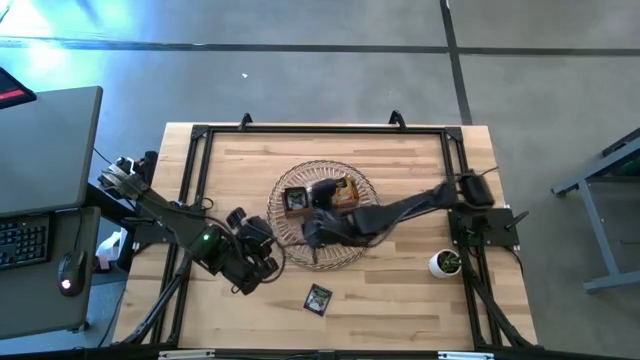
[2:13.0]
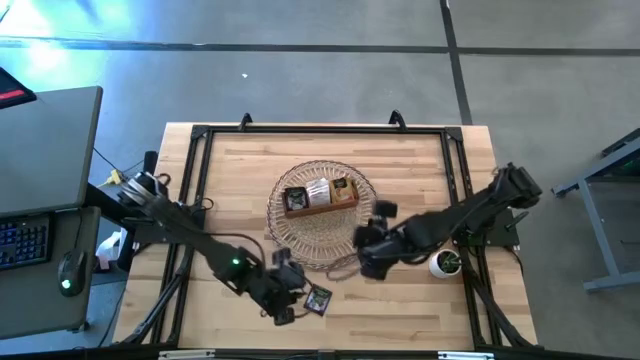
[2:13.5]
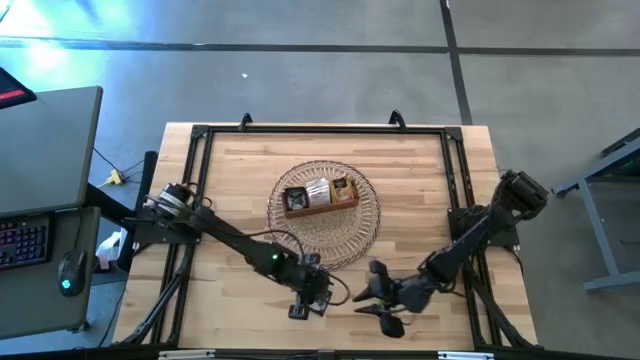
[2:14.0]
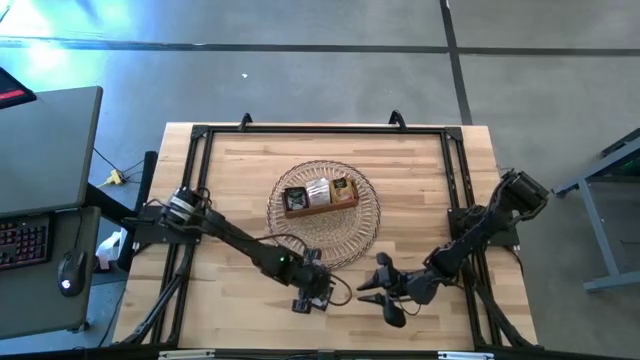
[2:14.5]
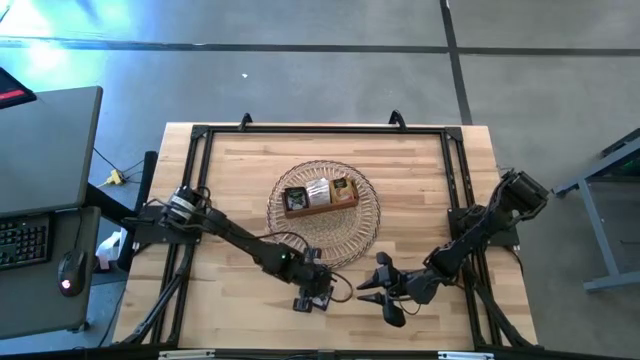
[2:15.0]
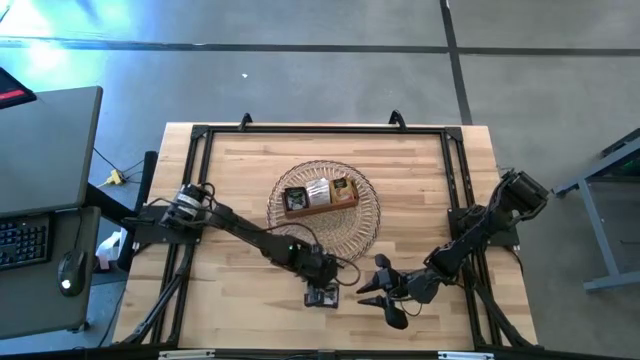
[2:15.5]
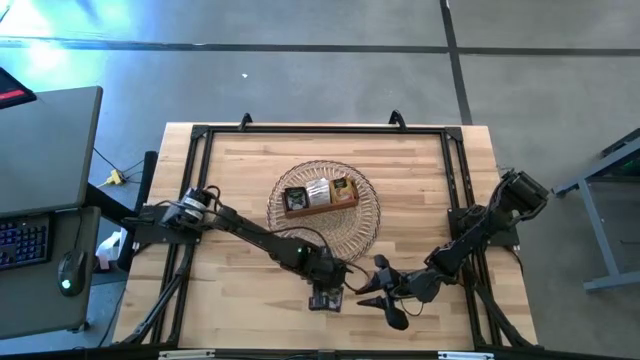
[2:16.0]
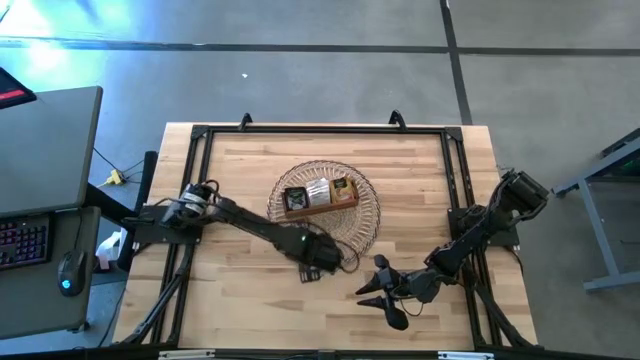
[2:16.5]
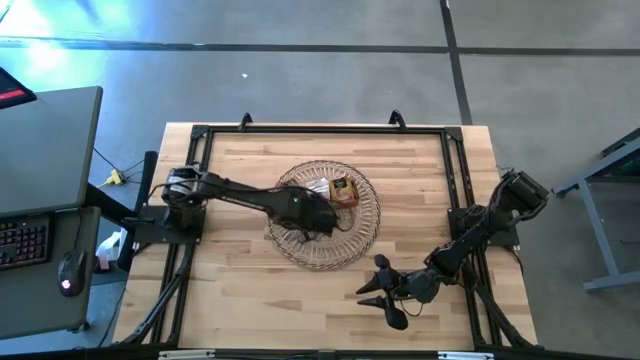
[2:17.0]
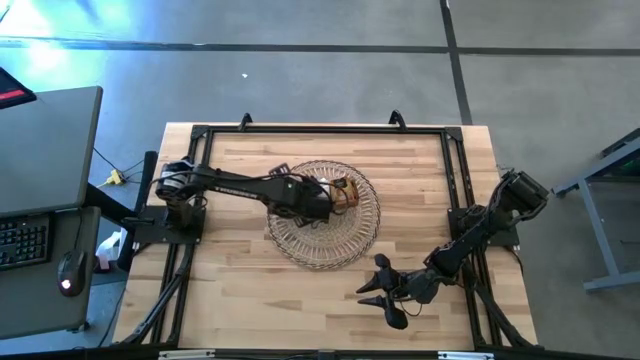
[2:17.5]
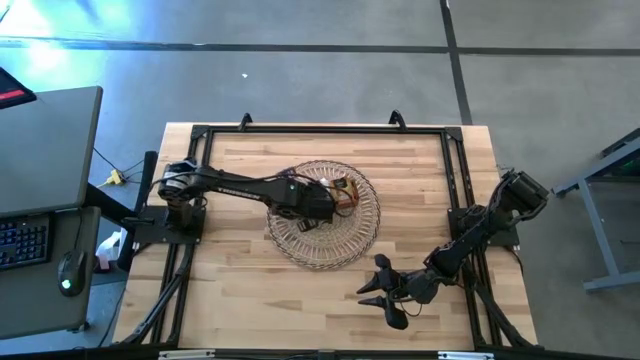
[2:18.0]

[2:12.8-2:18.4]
Task: Pick & Place Tea
Put the violet tea bag into the left section of the brown wooden organizer

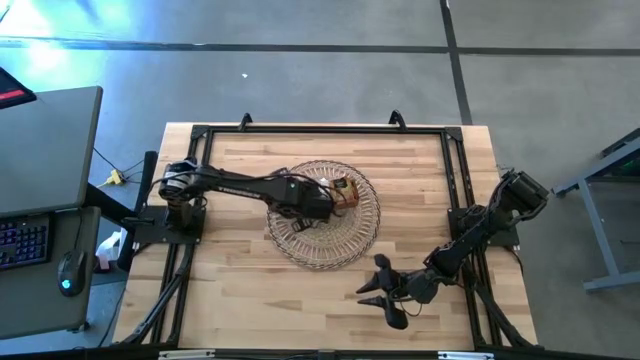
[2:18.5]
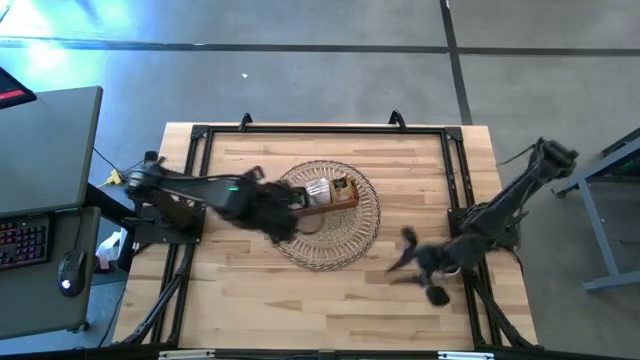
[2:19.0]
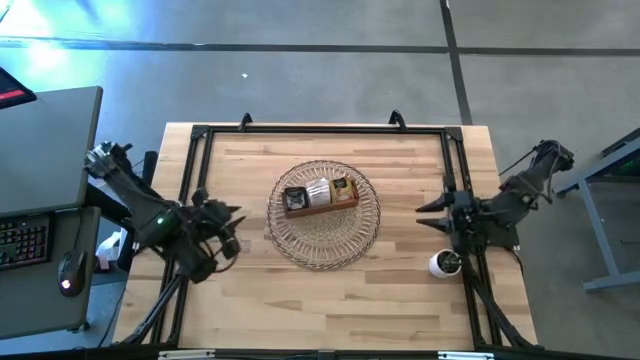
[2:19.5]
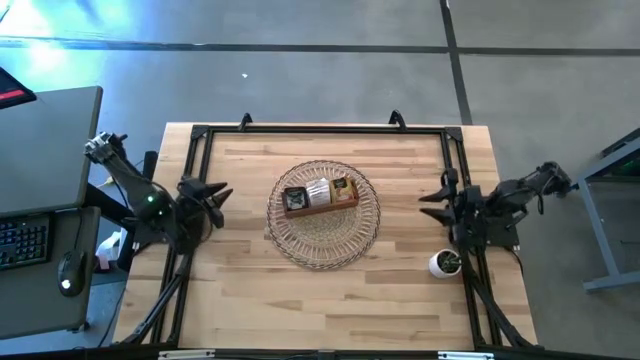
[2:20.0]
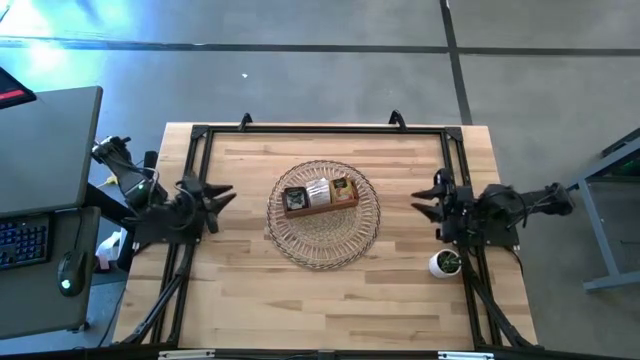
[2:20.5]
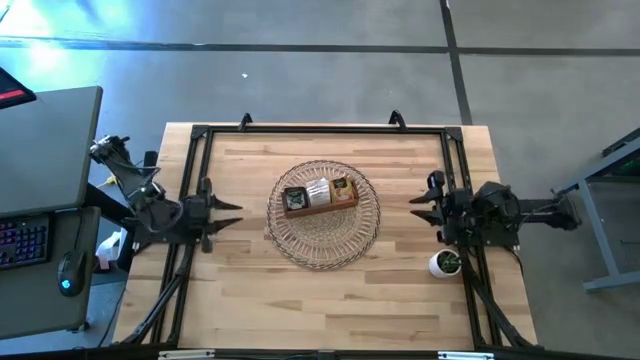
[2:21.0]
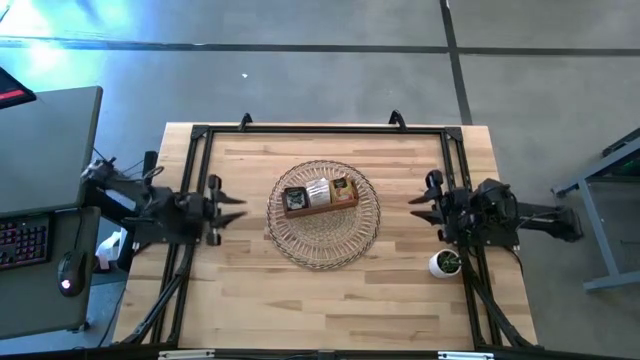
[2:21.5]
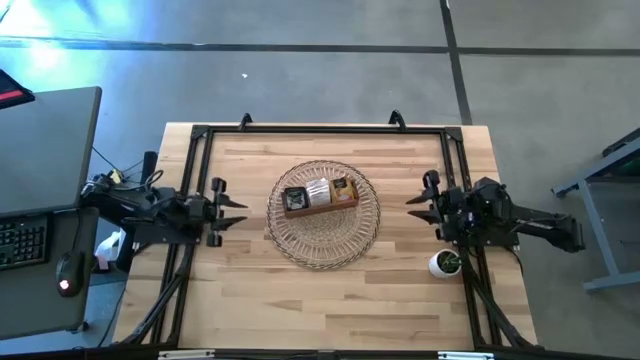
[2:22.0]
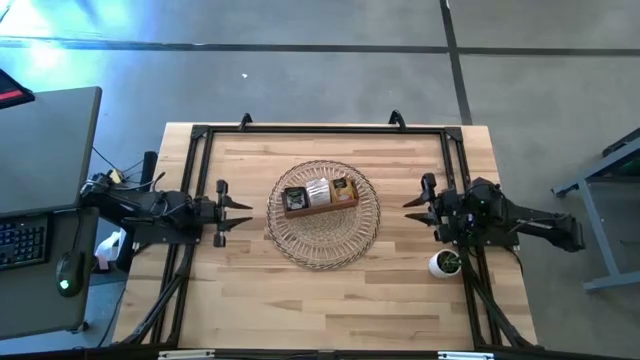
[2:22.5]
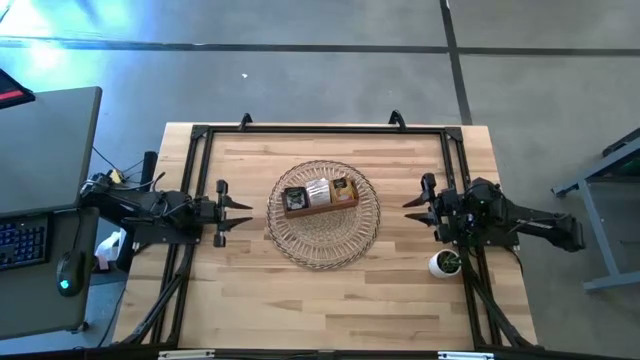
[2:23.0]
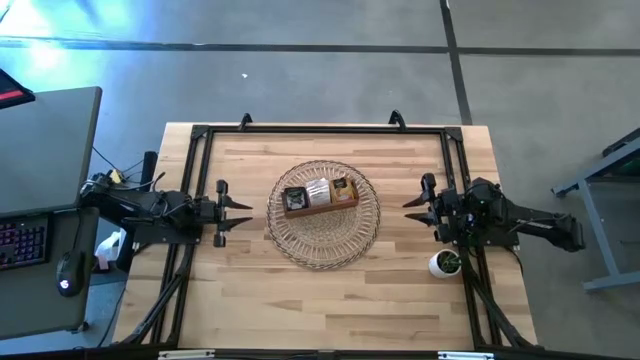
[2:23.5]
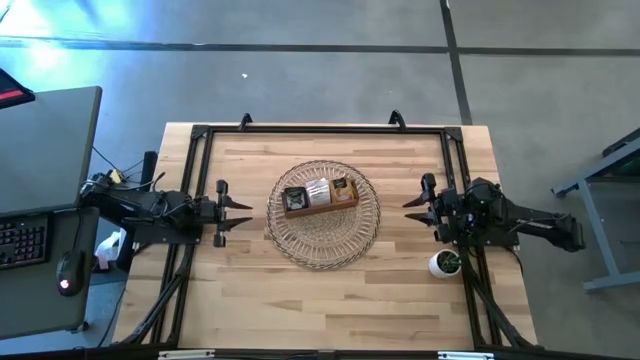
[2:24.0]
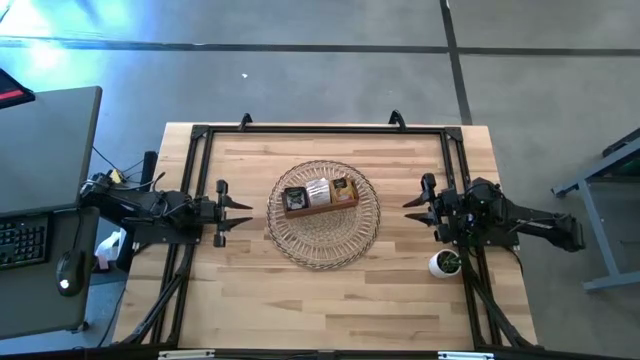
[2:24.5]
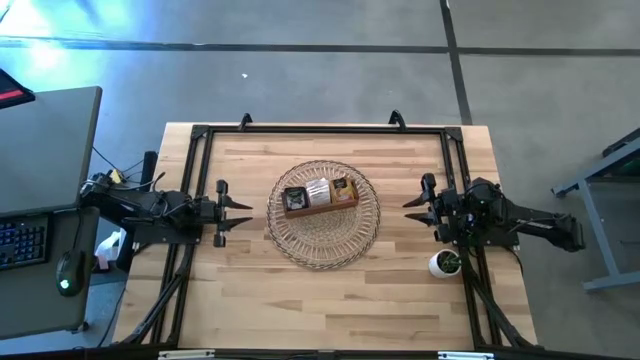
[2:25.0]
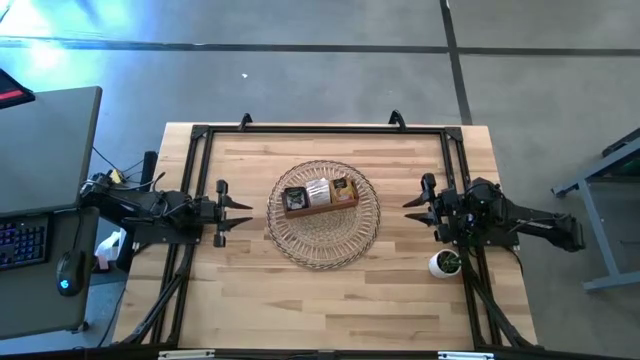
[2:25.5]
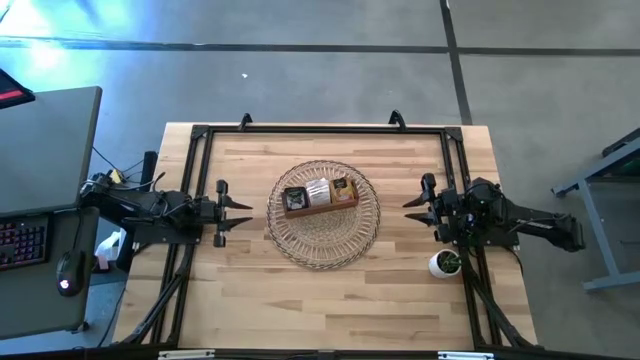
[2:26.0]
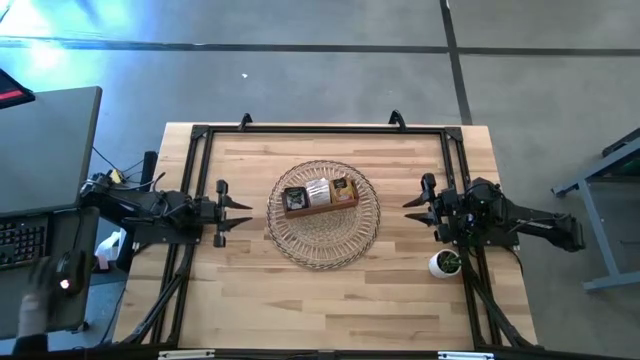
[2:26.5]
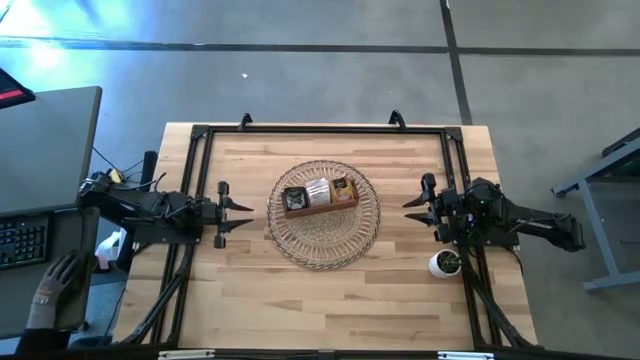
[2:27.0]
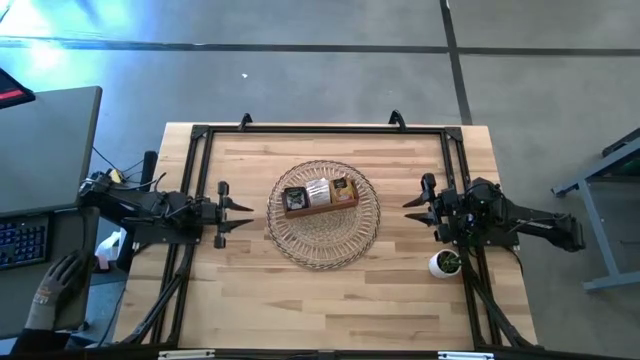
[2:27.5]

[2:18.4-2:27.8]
Return to Home Position
